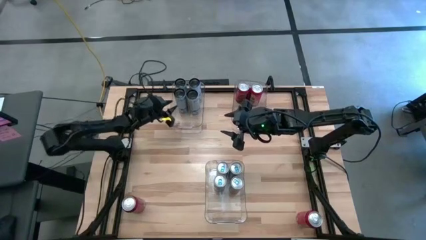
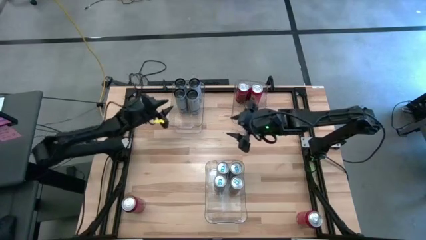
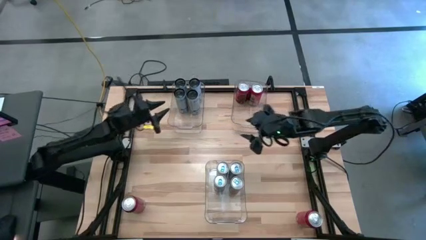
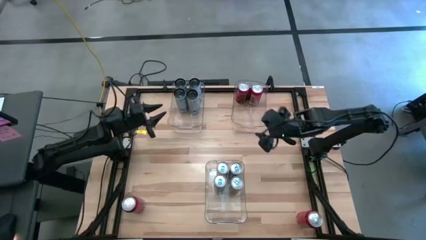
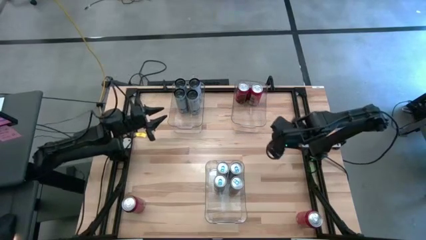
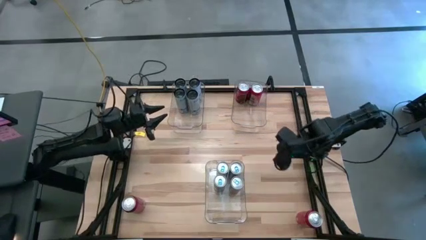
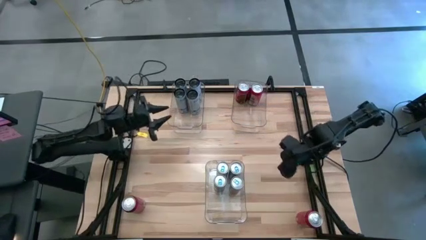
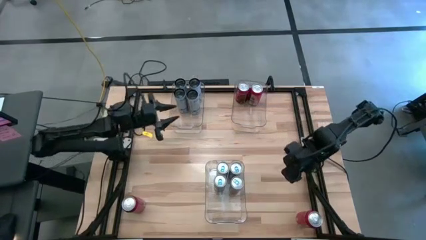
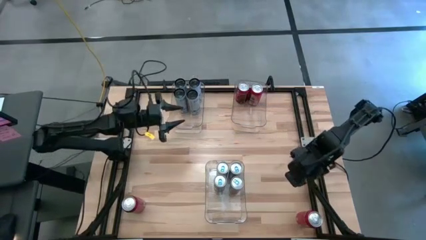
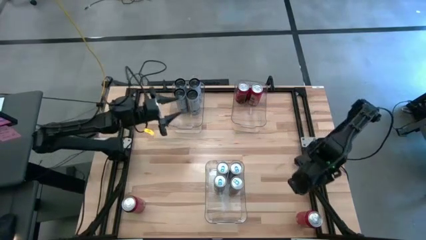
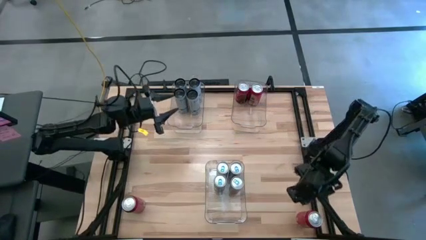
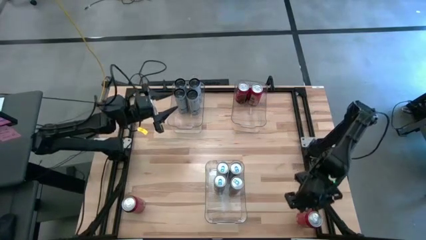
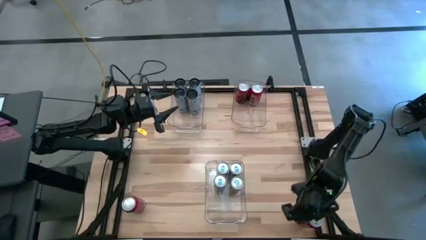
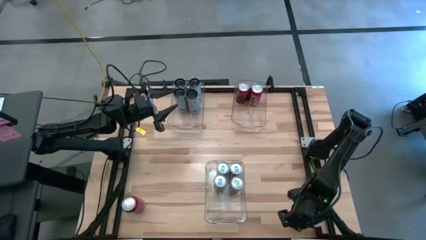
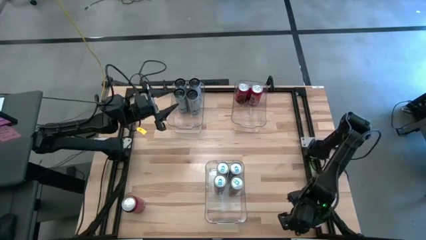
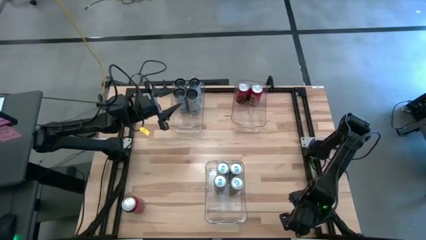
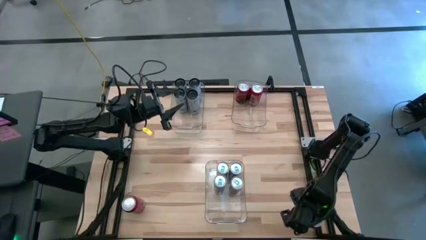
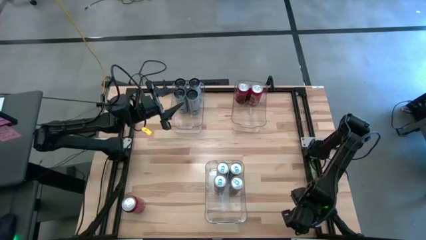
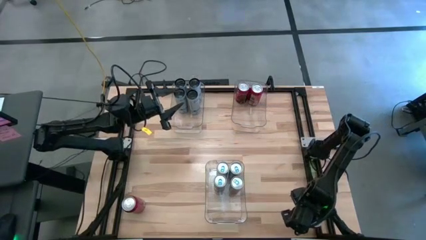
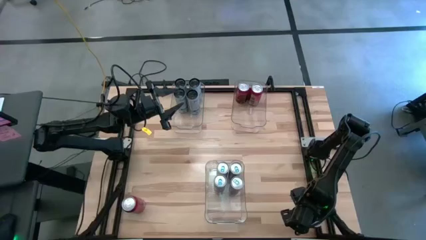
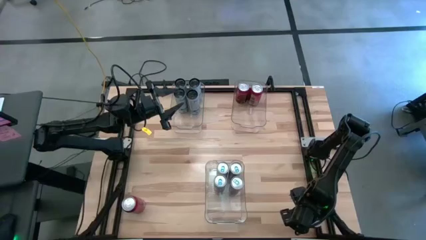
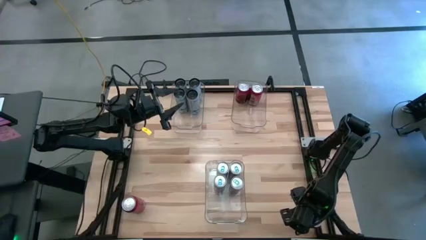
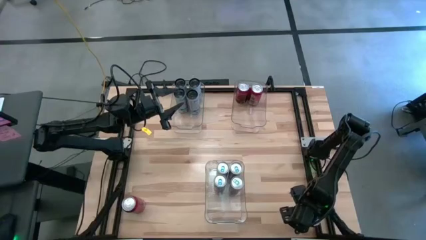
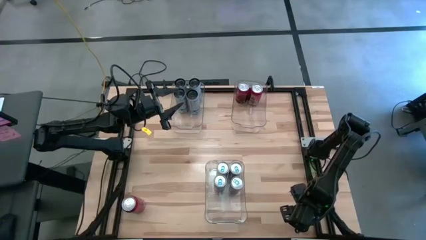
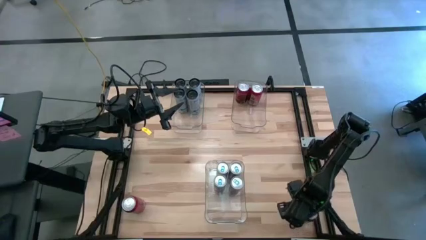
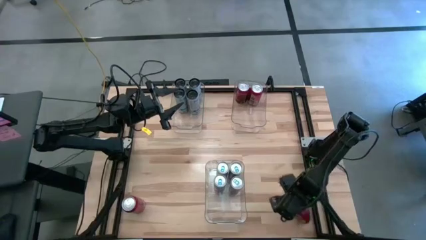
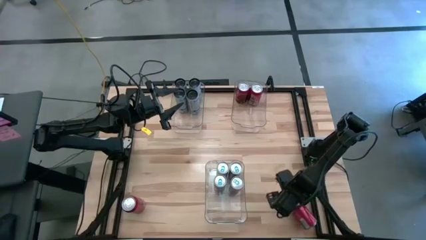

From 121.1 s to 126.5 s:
Task: Sort soda cans
Put the right red soda can into the top right transparent bin

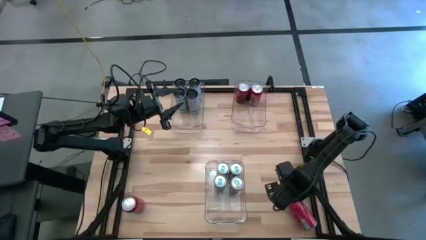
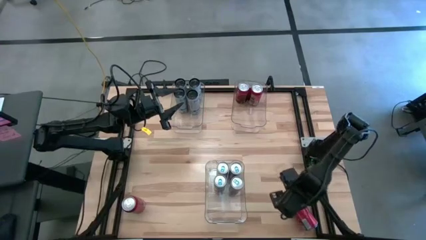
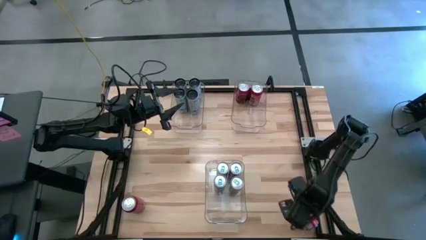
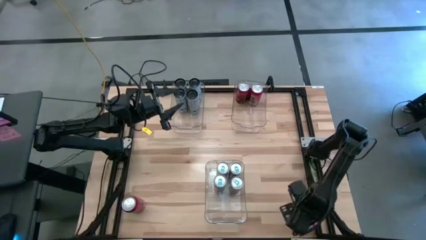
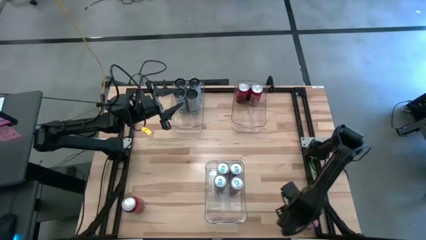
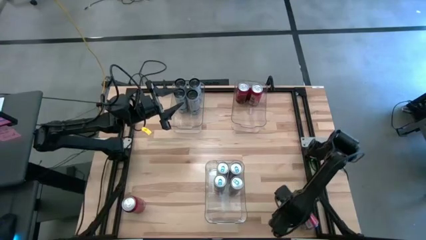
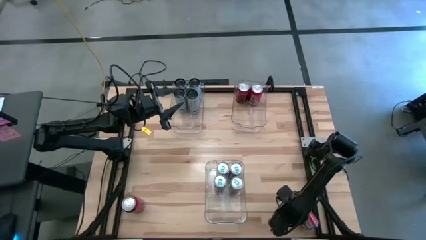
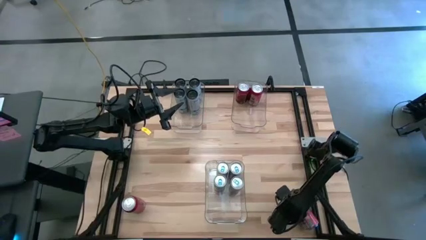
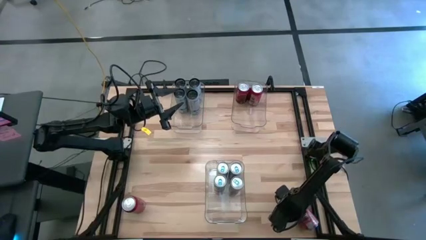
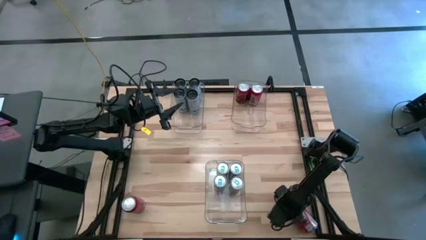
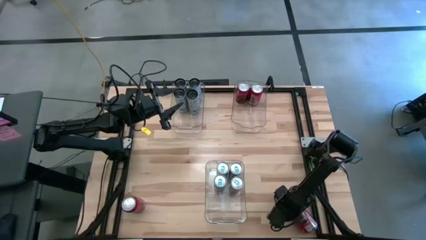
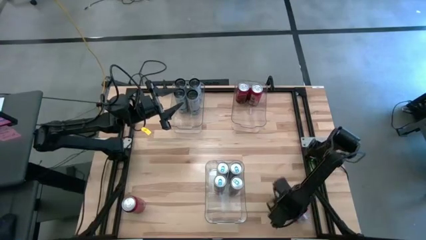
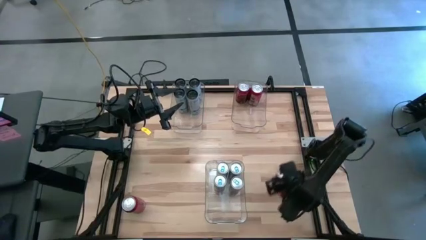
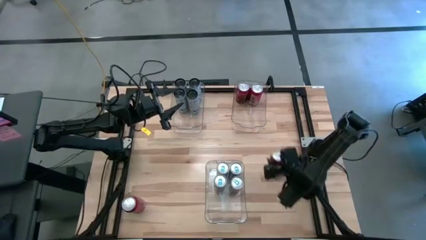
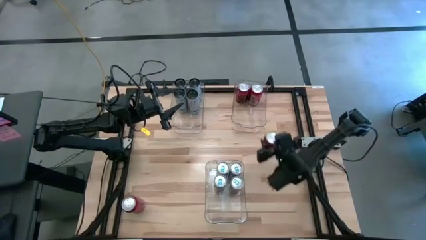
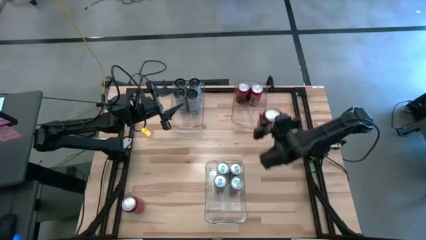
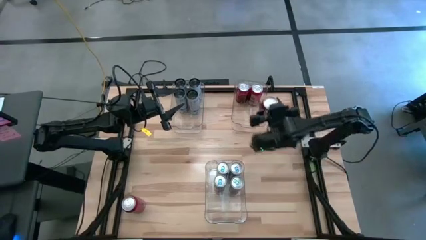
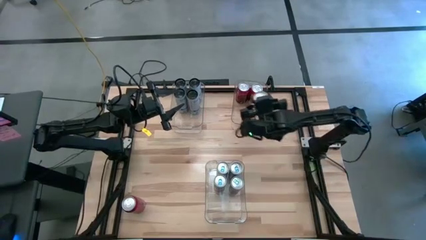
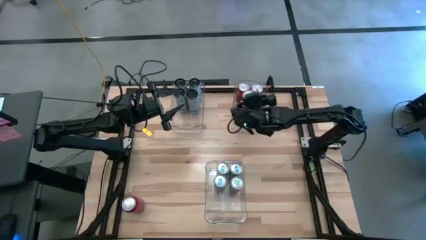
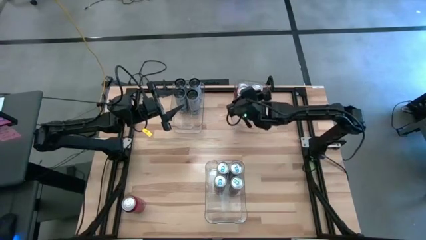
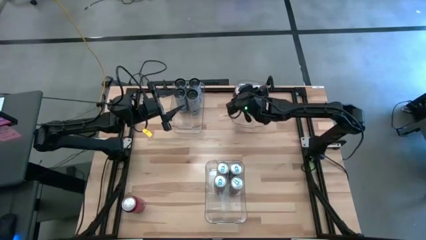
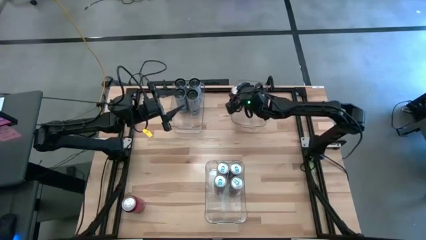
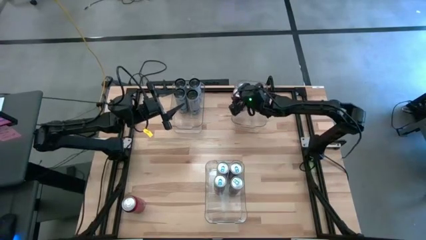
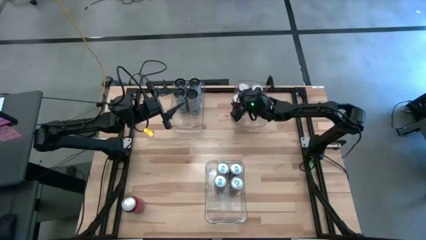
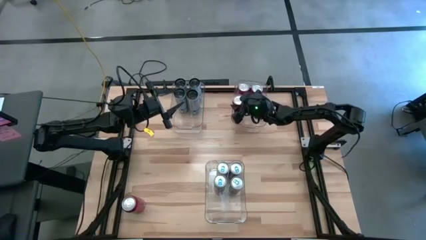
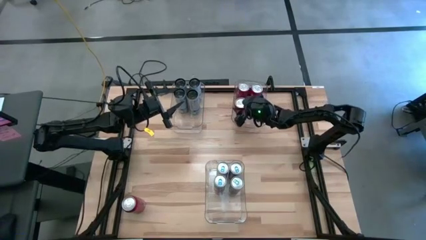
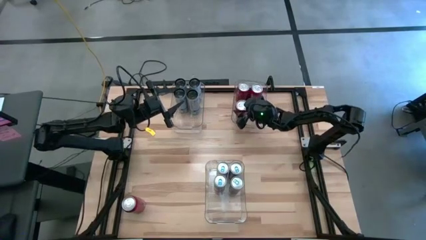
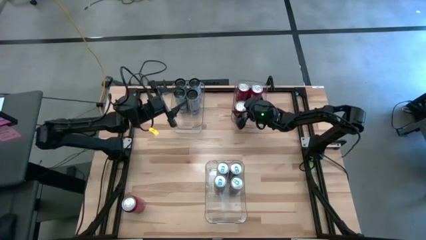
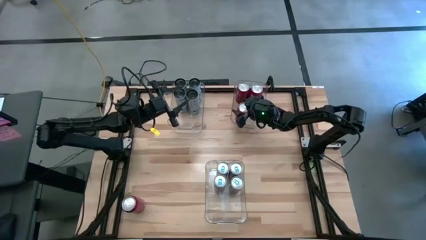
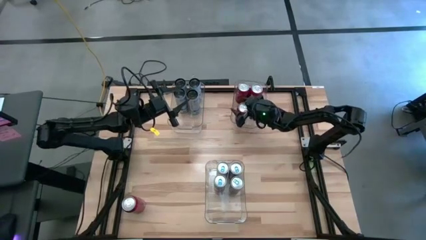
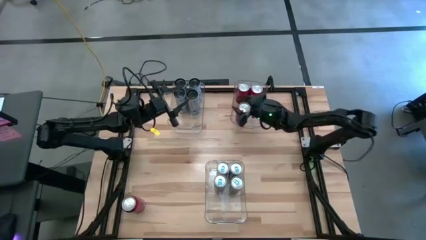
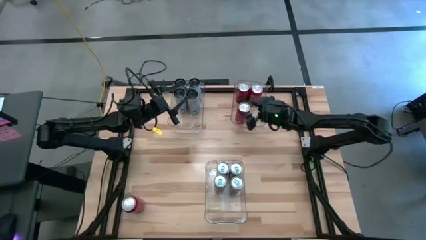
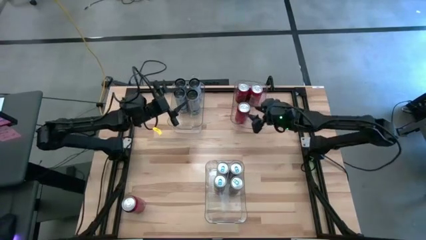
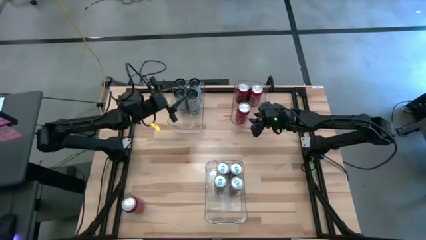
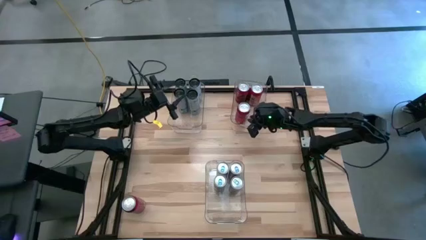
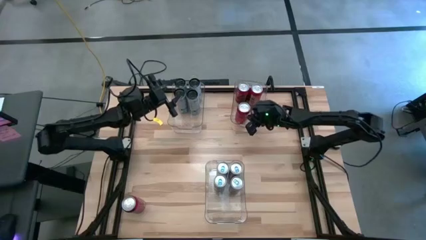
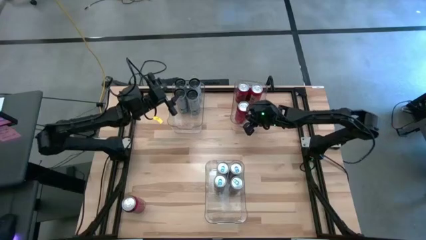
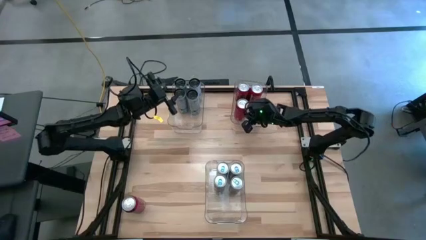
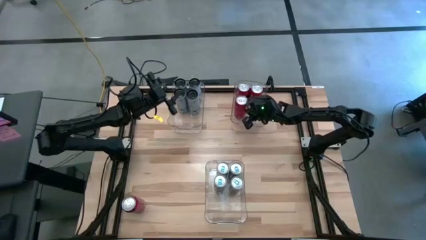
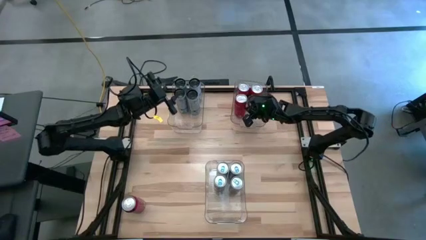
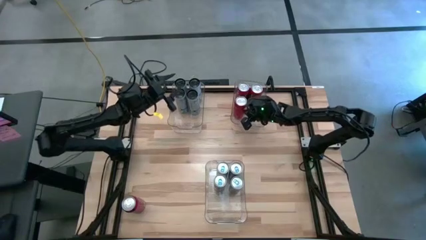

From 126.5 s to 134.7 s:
Put the right red soda can into the top right transparent bin

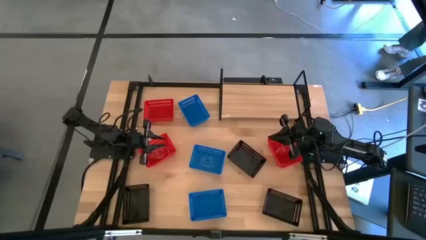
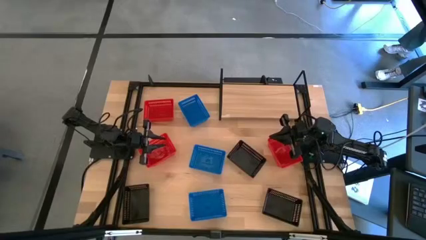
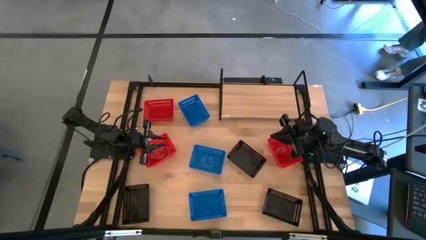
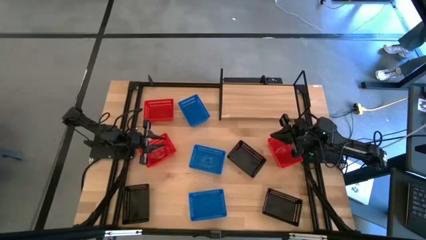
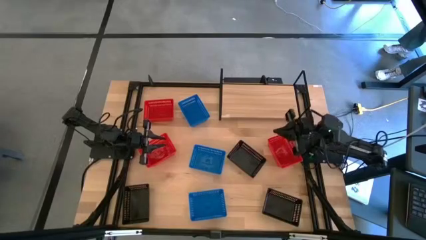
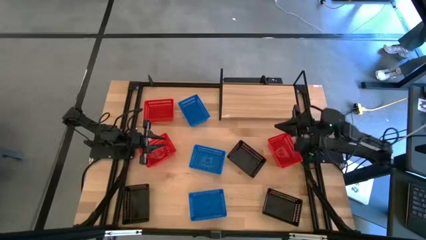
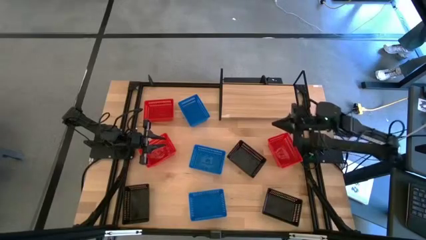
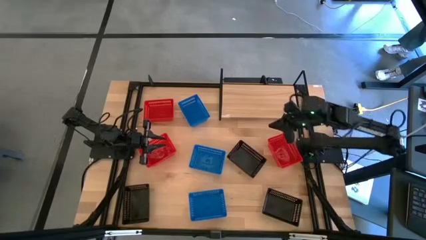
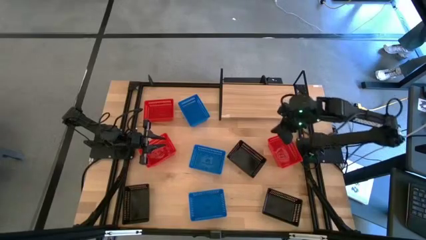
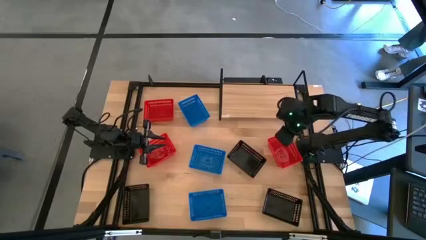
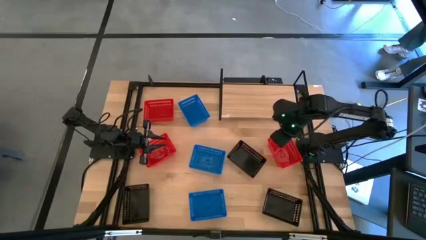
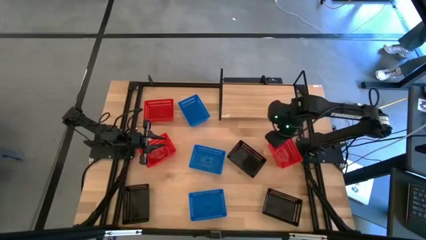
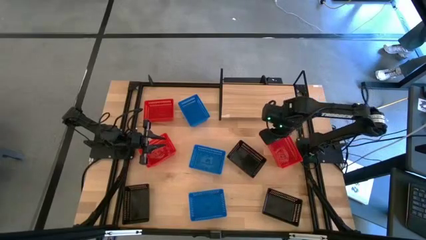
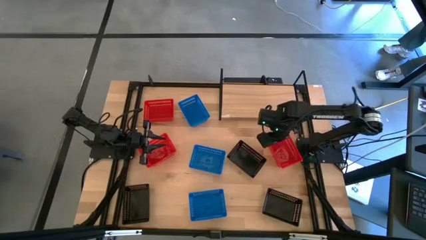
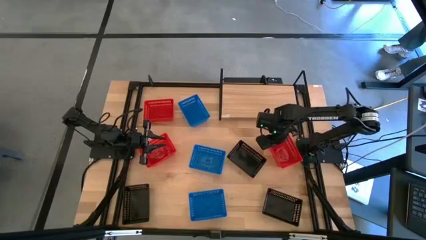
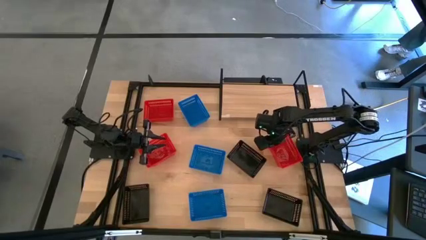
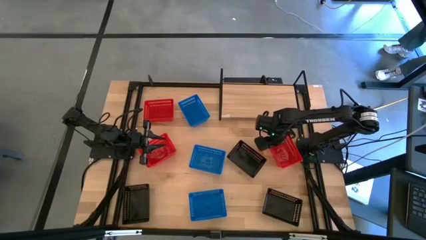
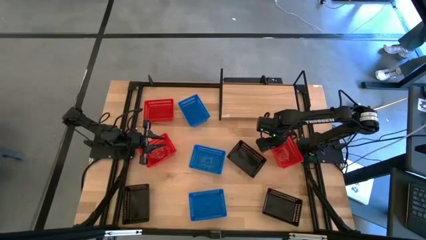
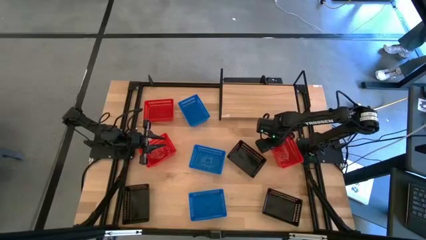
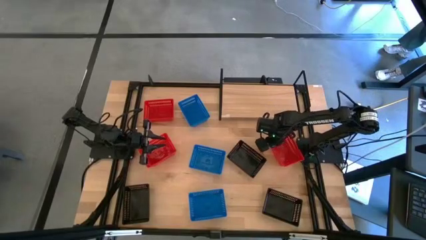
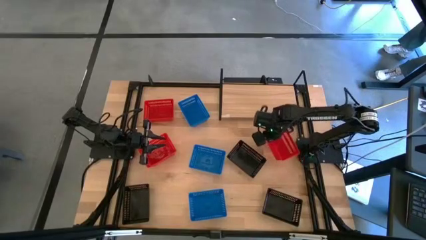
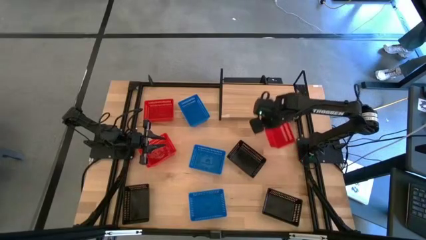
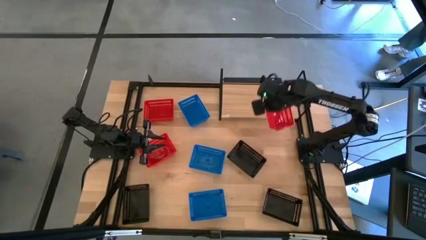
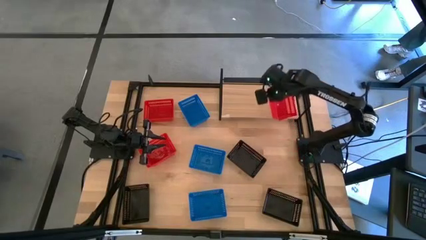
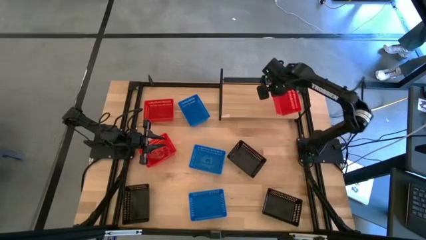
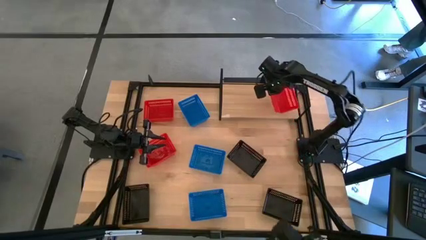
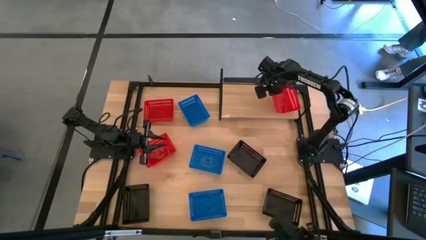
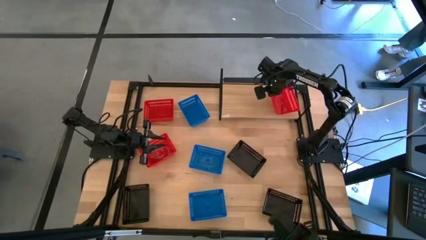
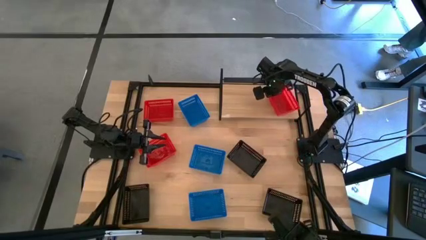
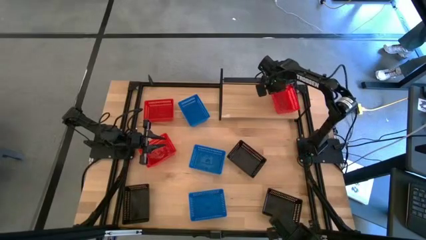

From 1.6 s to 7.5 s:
Task: Stack baskets on shelf by color
Put the bottom right red bin on the shelf
